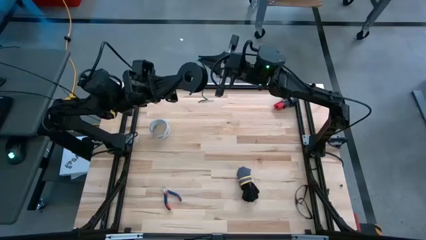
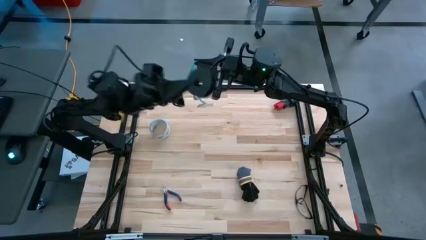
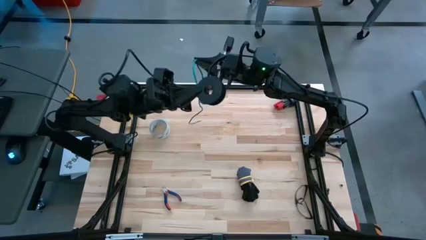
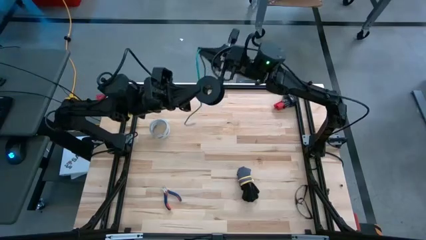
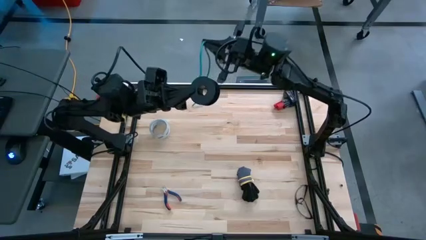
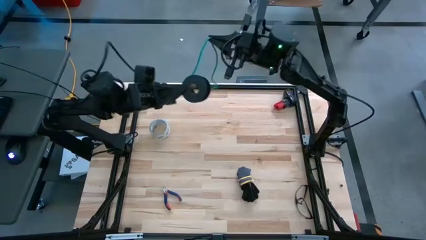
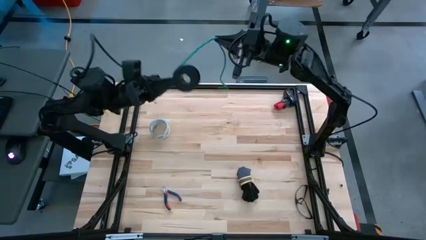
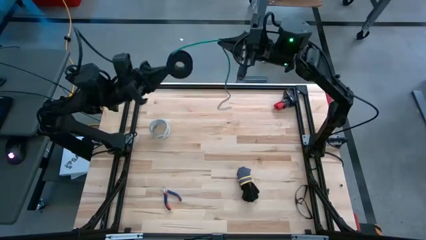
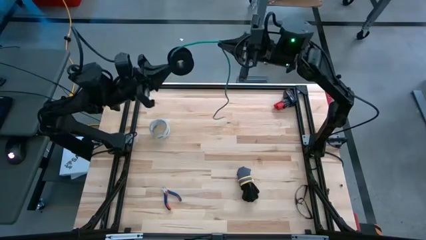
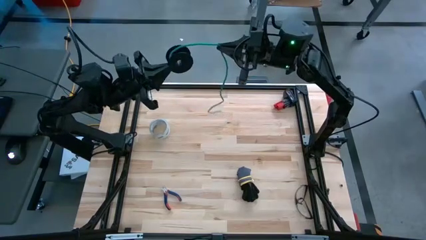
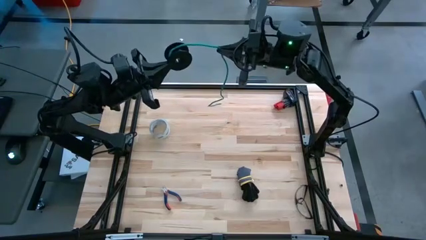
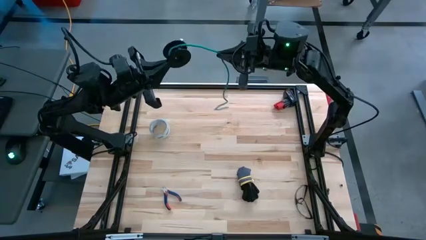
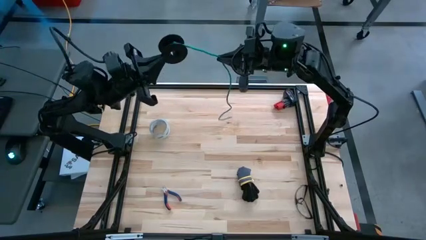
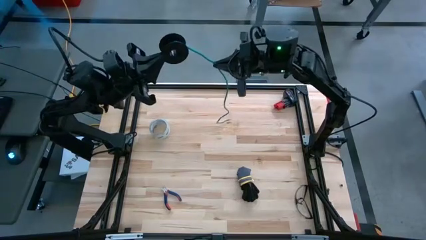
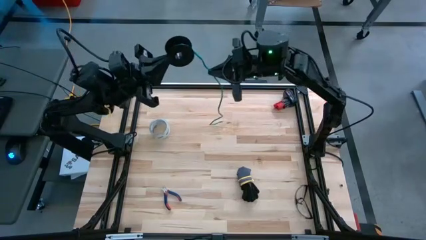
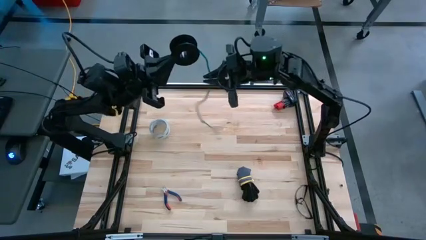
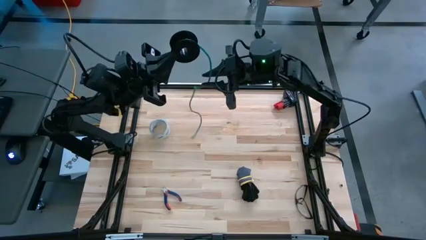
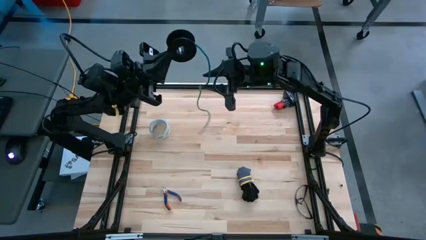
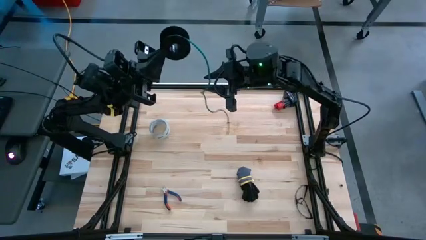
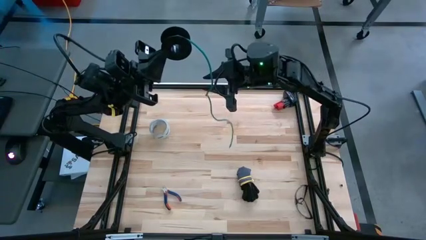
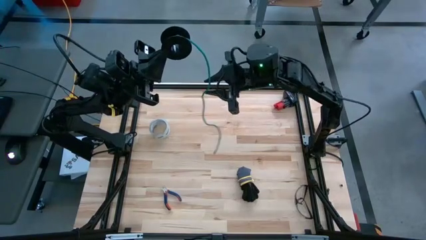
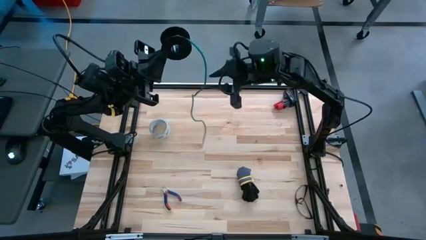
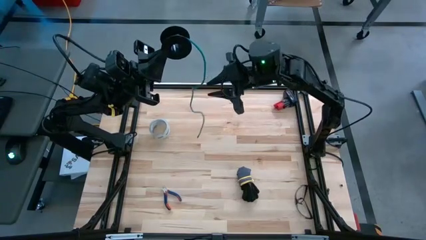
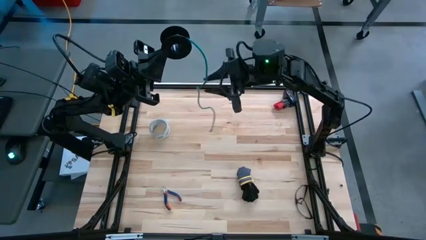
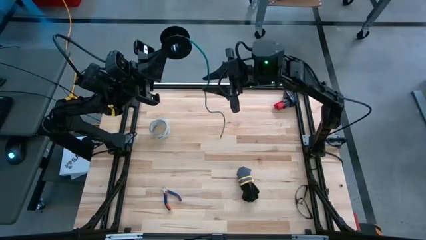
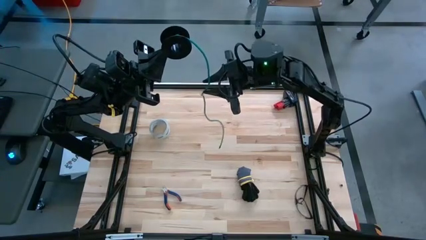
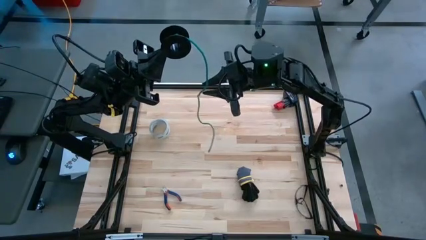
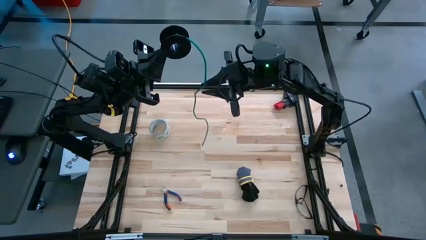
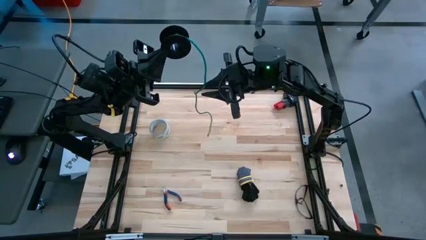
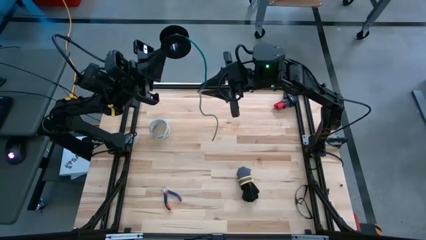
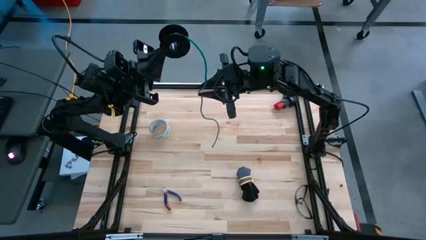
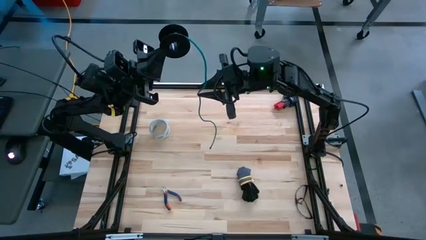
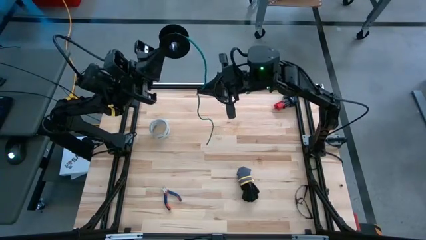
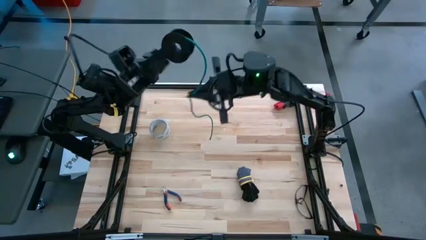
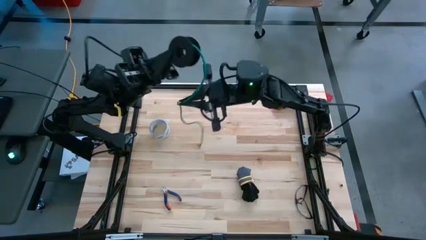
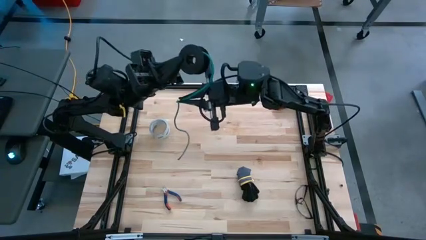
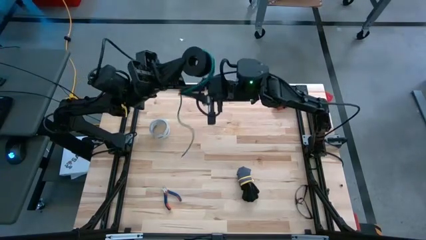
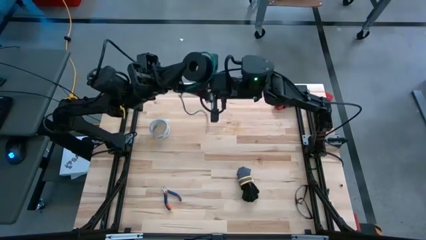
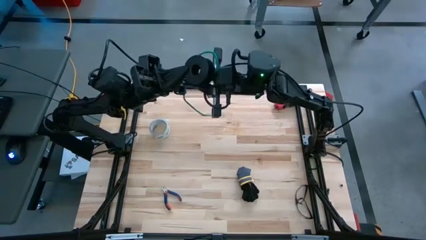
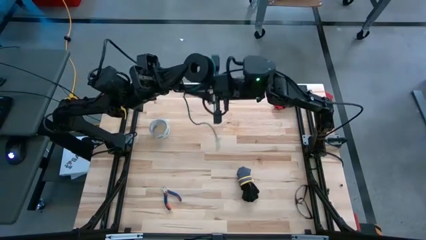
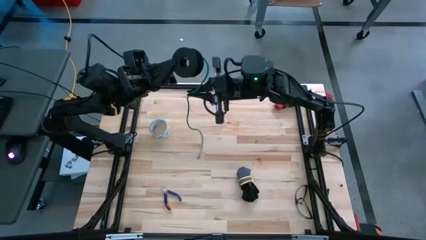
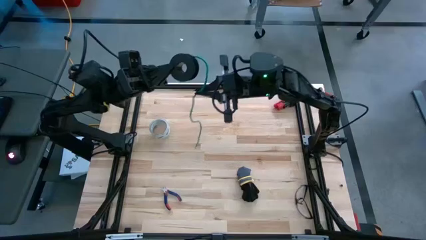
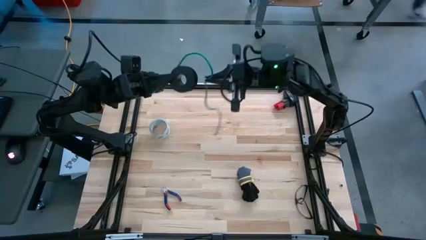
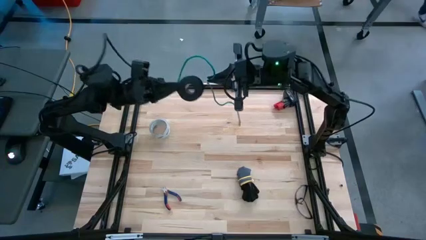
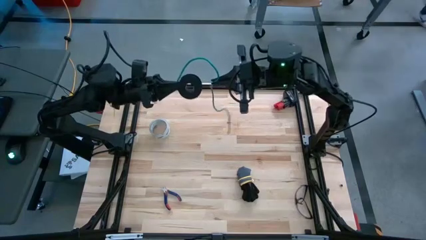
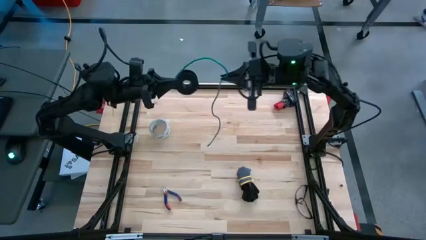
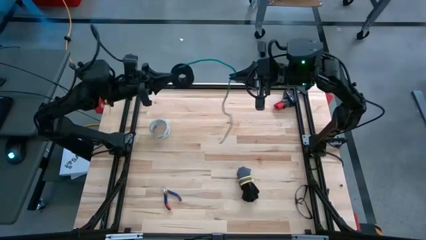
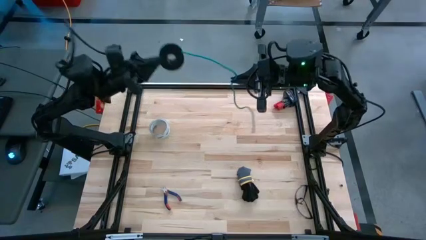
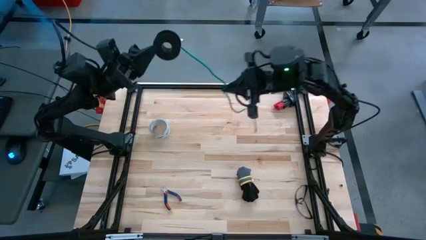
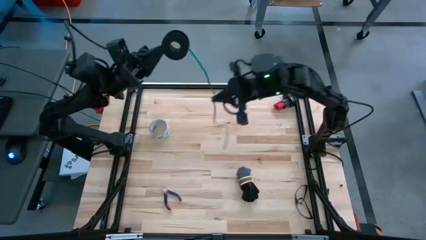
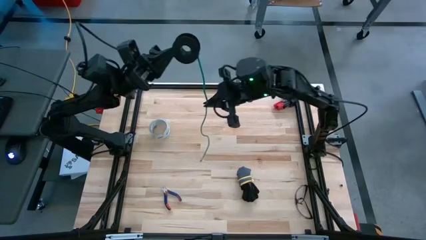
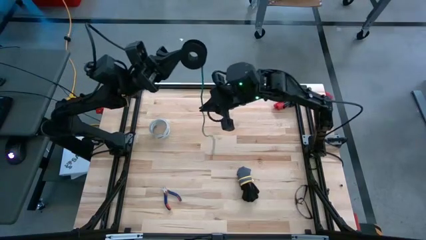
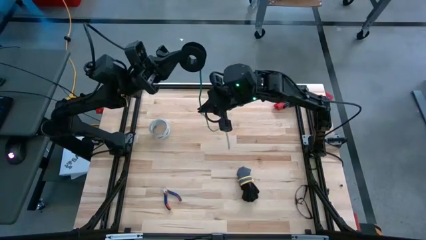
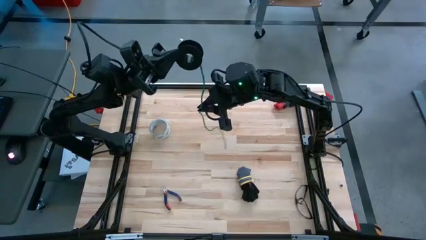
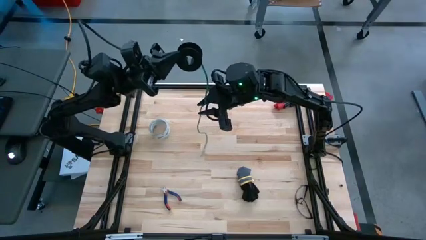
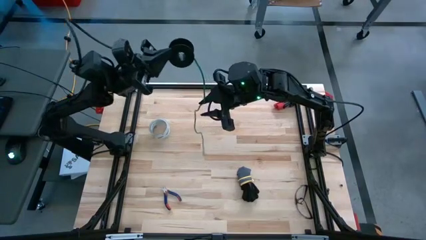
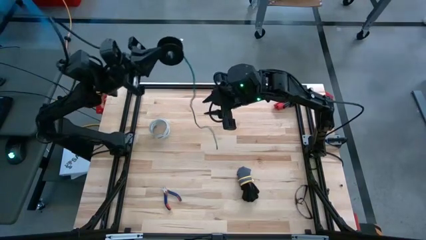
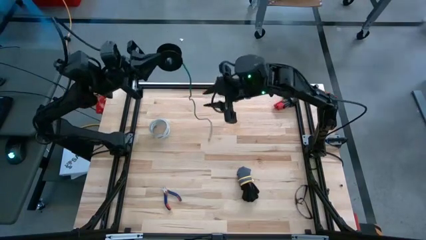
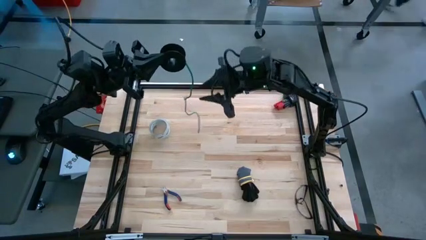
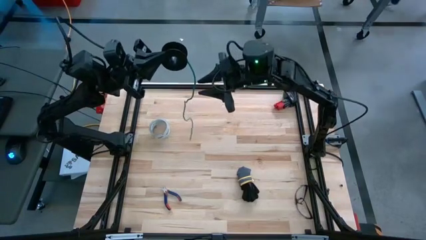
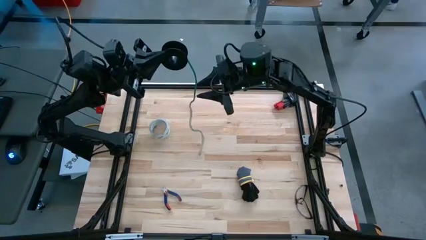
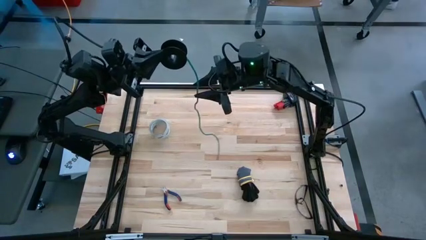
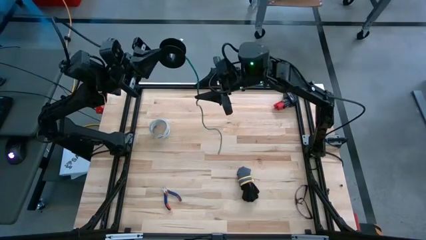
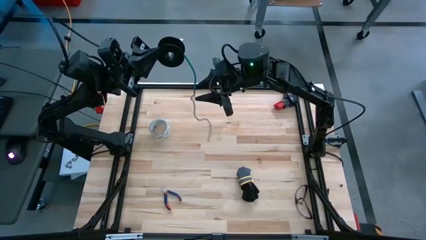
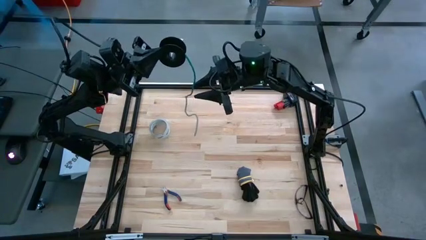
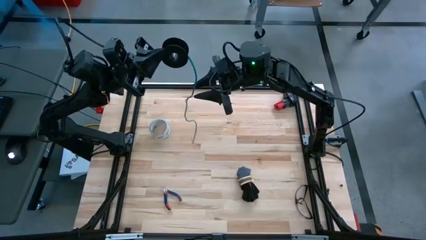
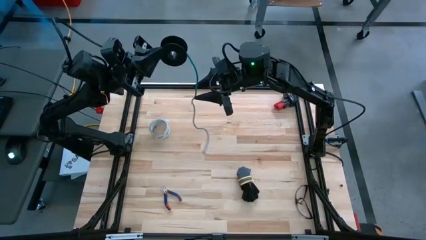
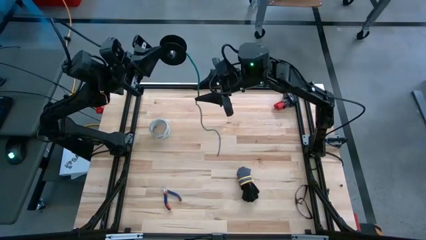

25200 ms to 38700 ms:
Task: Coil cords
Coil the green wire on the spool
